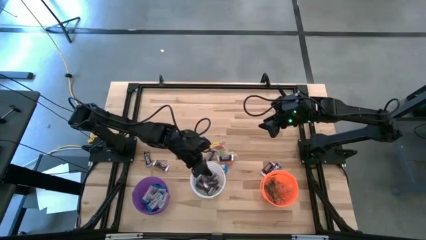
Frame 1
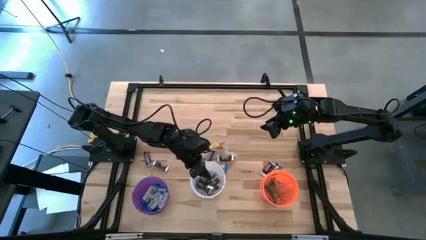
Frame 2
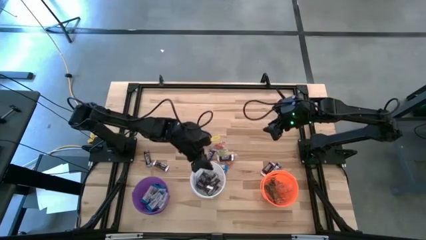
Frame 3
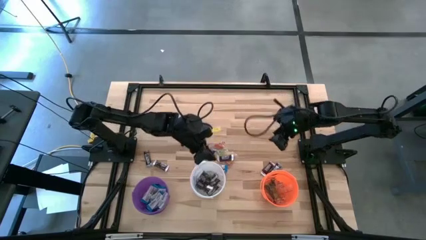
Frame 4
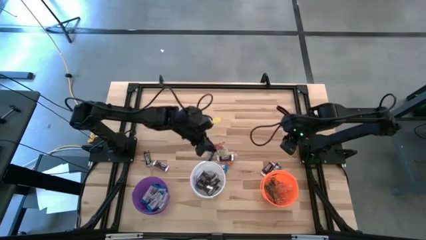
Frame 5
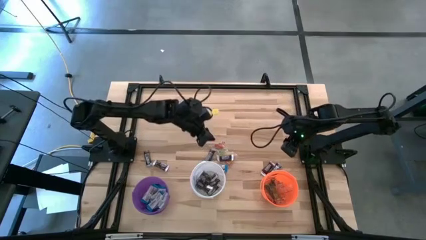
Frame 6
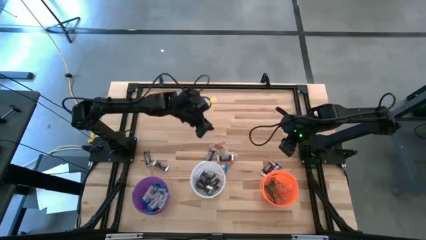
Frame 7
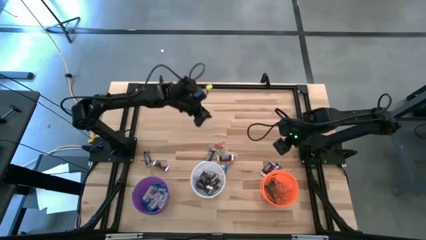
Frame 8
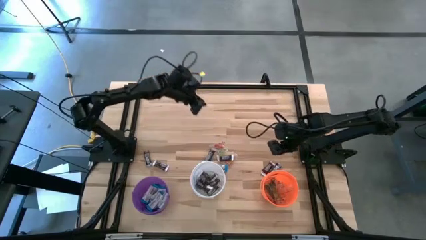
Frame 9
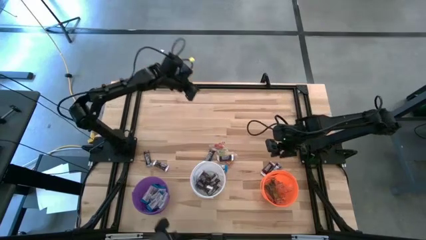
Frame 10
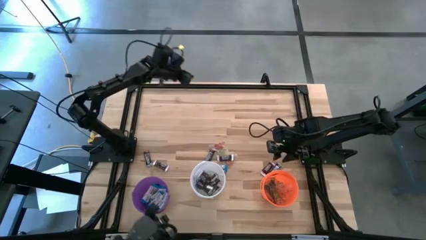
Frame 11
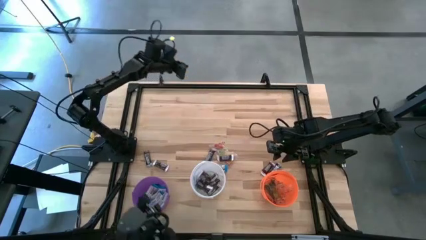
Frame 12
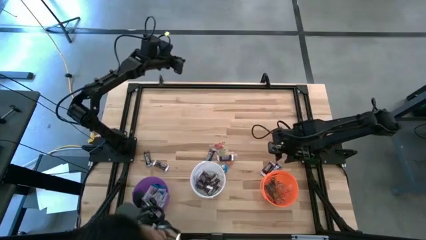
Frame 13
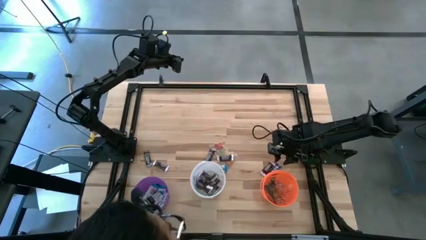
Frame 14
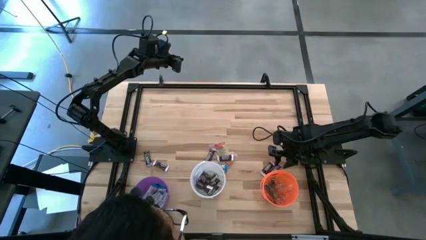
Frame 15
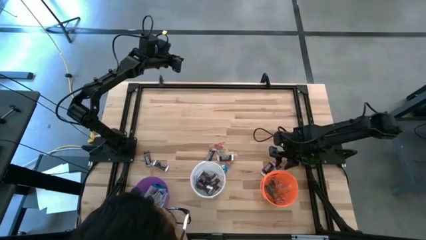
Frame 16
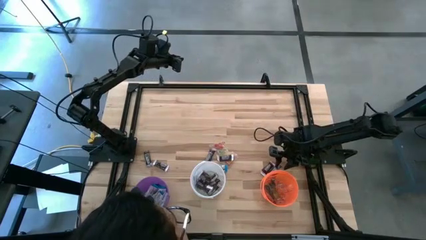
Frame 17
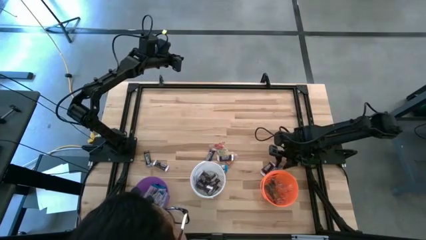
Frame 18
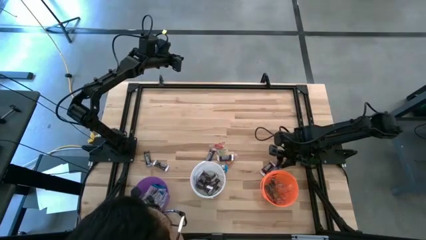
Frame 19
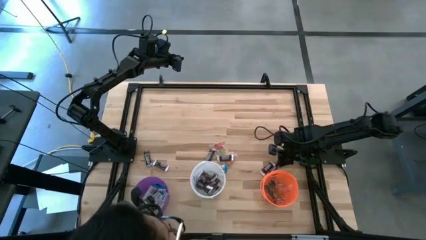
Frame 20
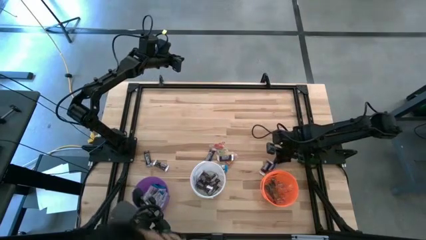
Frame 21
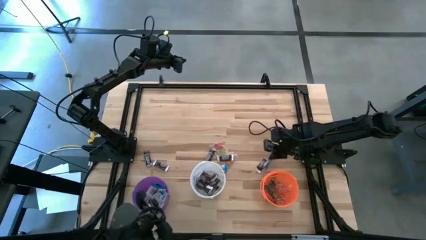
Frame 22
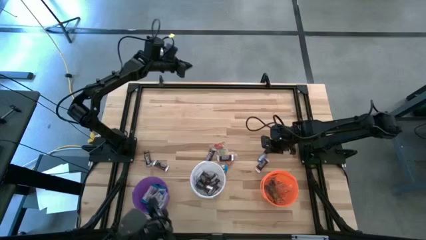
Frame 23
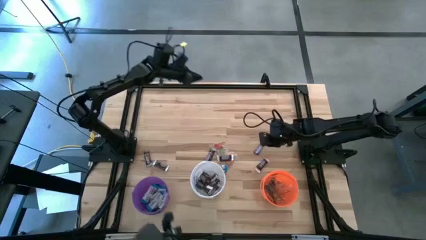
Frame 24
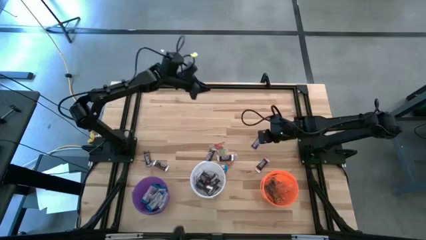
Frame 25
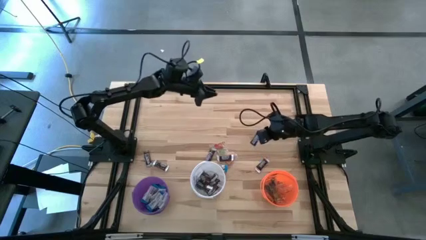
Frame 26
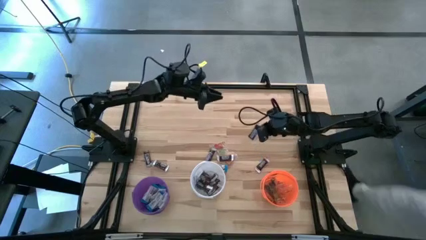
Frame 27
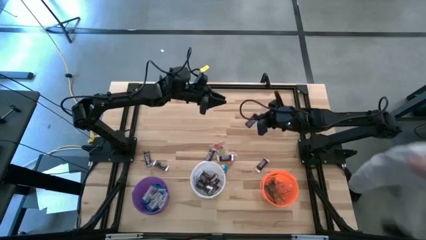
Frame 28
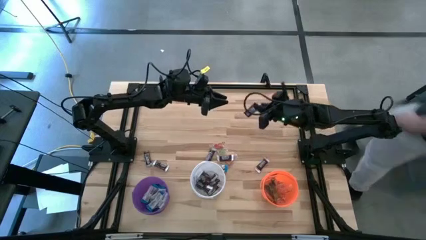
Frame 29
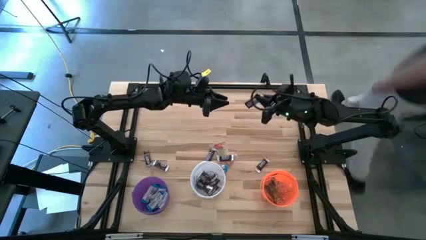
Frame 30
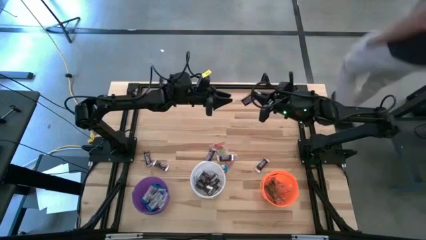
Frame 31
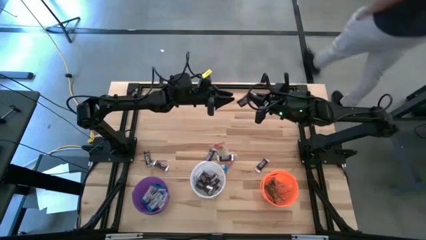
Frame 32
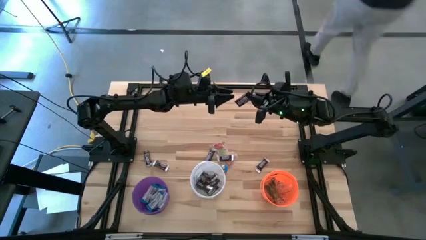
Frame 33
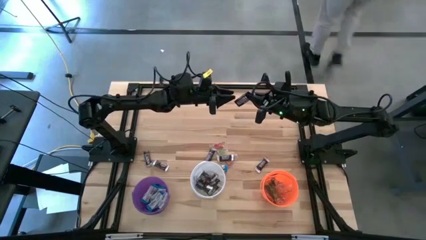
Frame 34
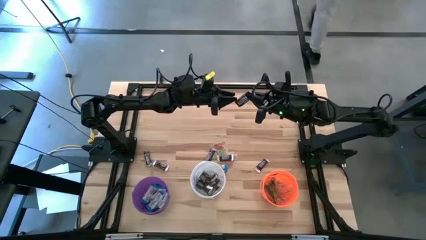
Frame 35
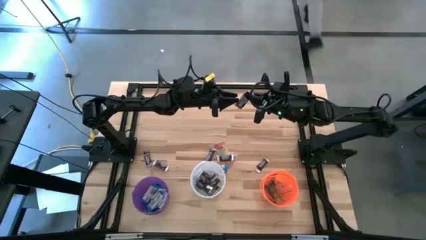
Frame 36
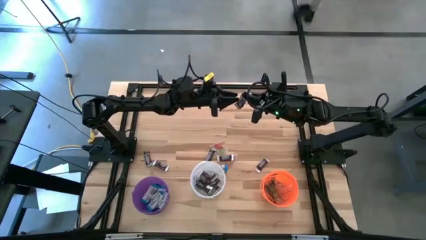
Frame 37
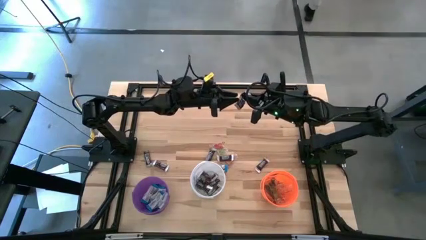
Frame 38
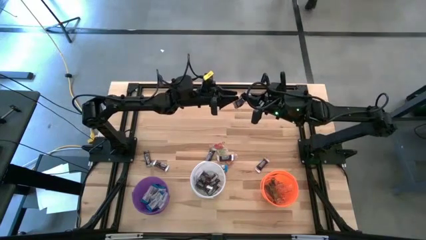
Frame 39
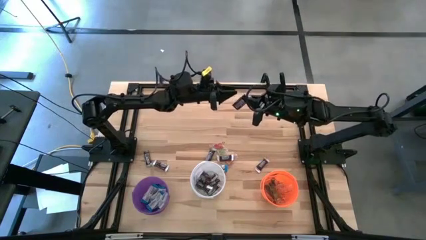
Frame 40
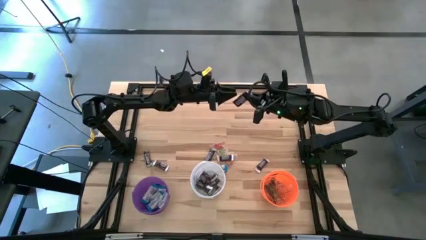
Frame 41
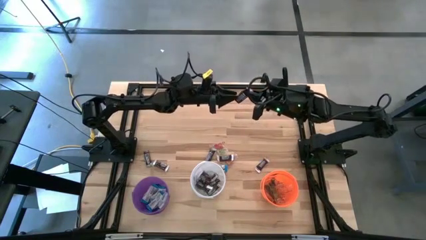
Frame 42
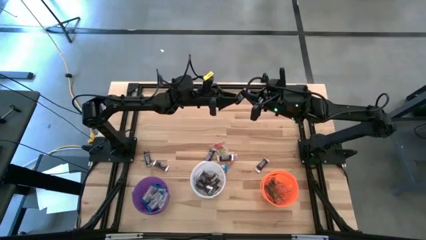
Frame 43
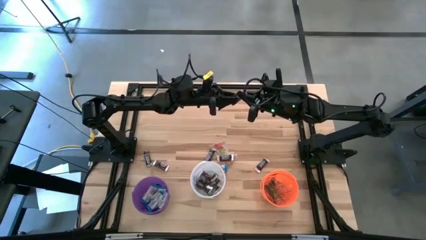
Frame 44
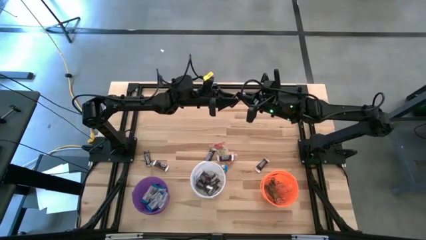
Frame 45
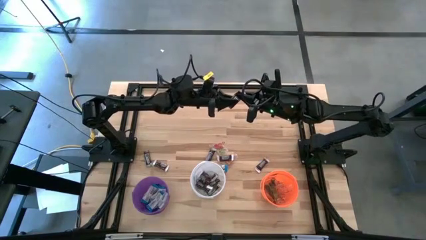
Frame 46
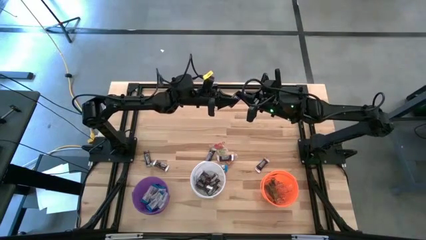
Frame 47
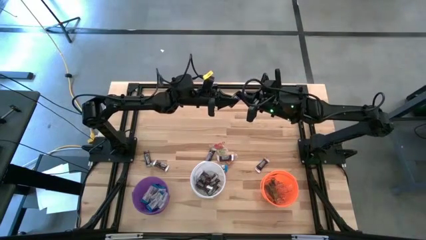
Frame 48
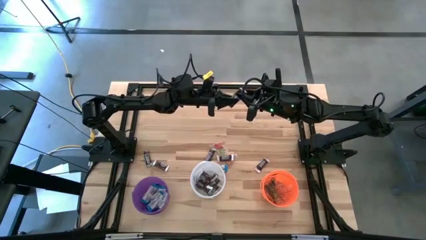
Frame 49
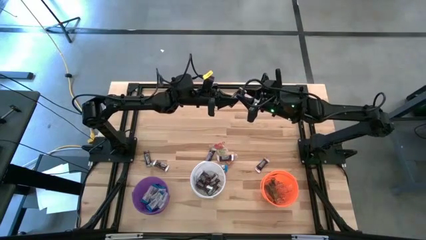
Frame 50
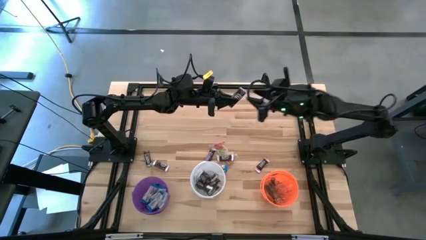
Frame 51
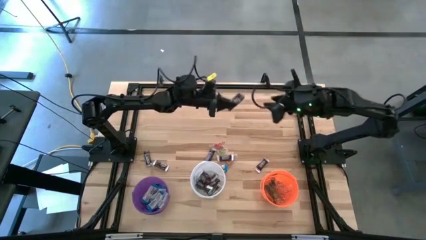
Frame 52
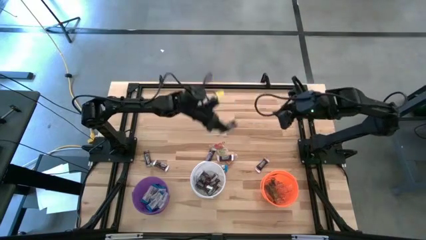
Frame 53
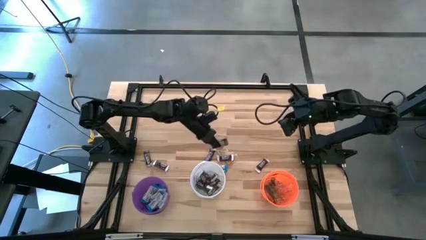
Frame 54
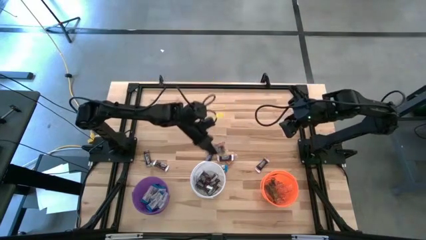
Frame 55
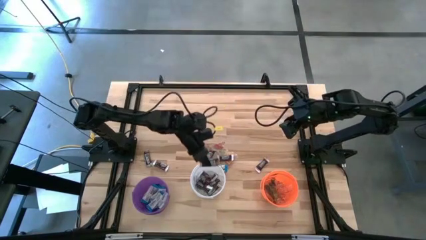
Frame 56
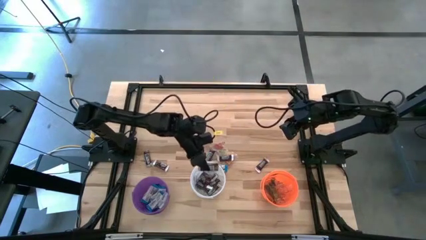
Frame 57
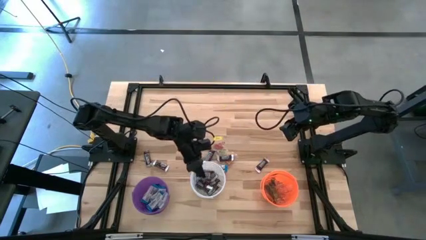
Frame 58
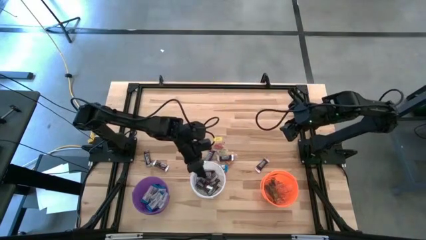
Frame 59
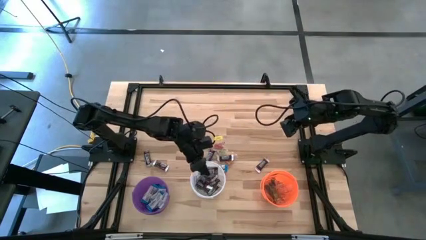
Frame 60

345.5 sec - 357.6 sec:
Task: Sort candy
Put the brown chocolate into the white bucket
